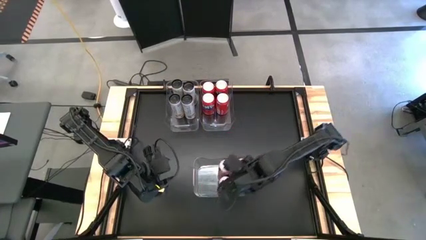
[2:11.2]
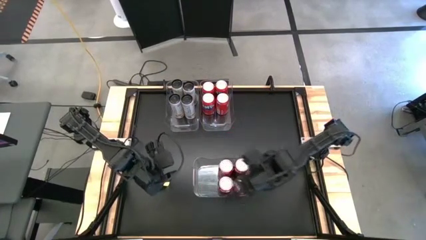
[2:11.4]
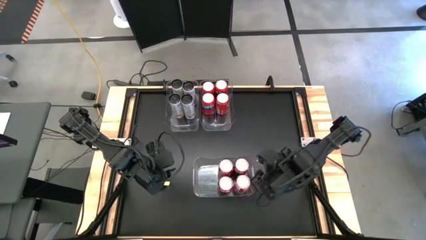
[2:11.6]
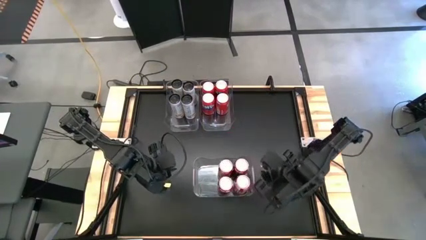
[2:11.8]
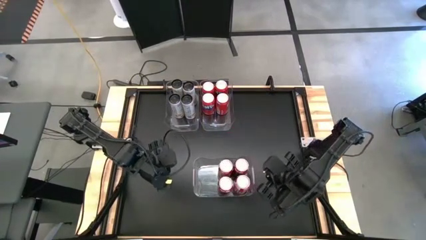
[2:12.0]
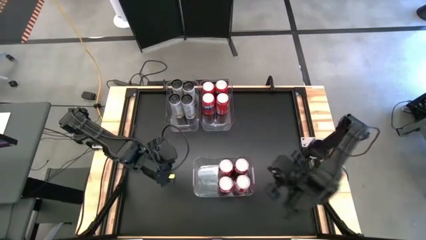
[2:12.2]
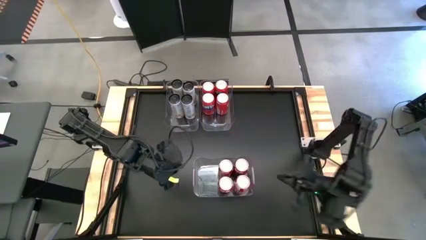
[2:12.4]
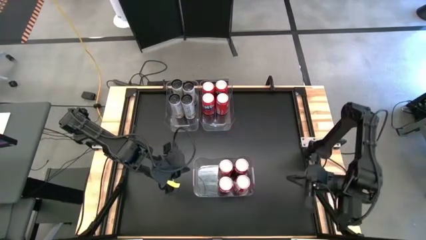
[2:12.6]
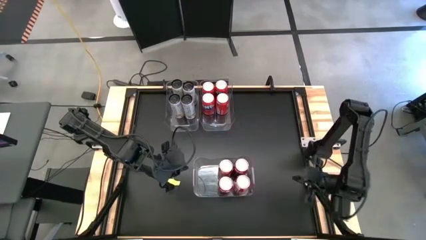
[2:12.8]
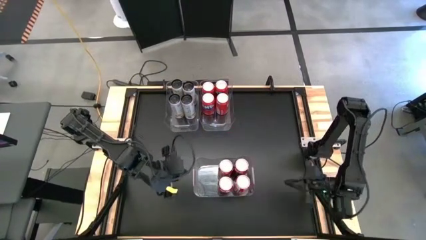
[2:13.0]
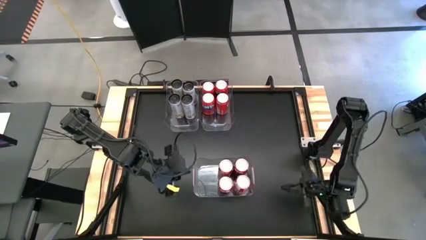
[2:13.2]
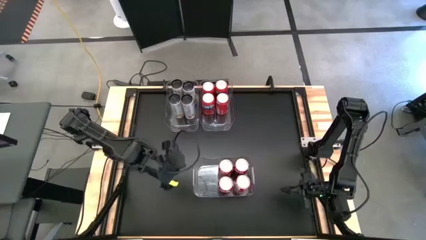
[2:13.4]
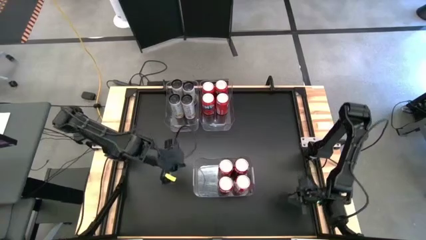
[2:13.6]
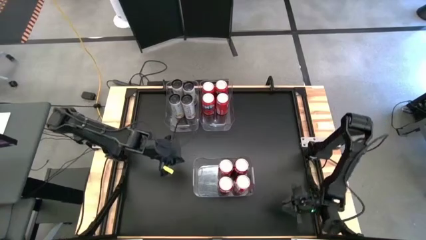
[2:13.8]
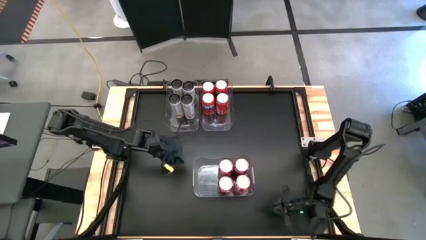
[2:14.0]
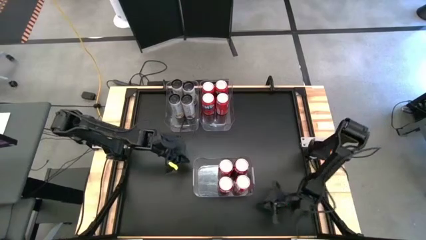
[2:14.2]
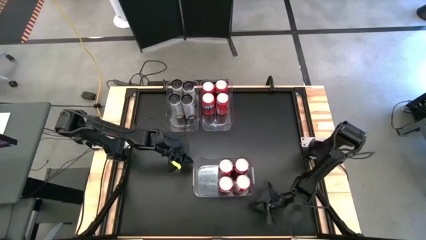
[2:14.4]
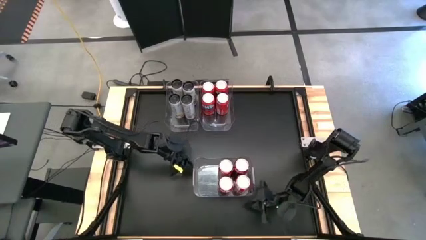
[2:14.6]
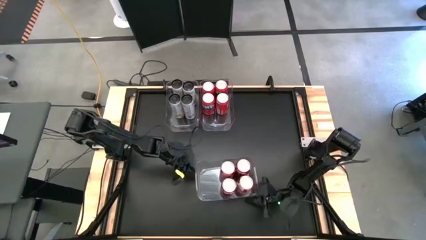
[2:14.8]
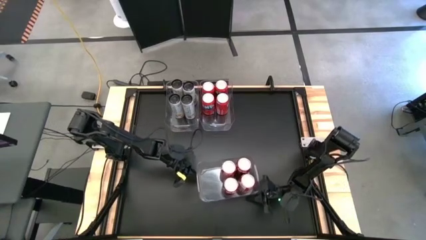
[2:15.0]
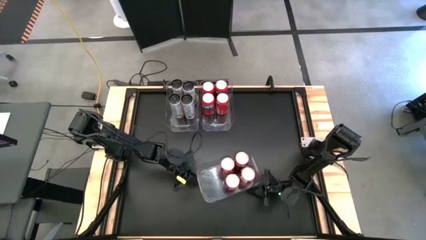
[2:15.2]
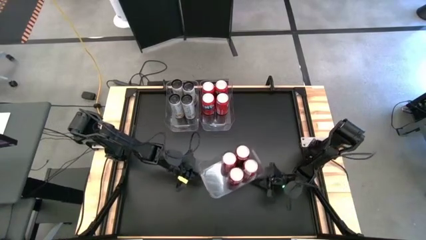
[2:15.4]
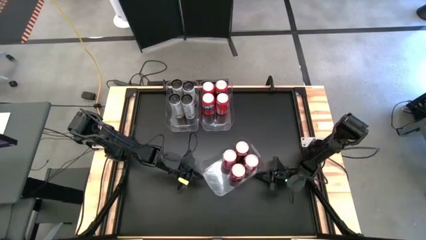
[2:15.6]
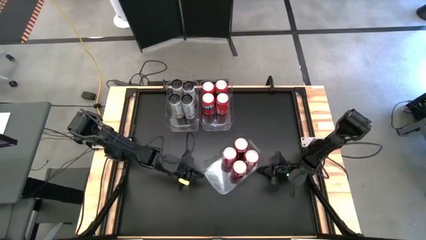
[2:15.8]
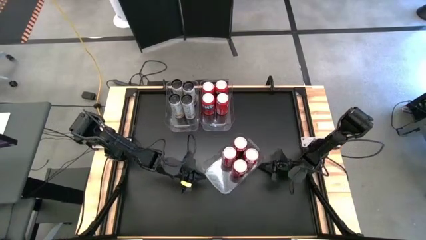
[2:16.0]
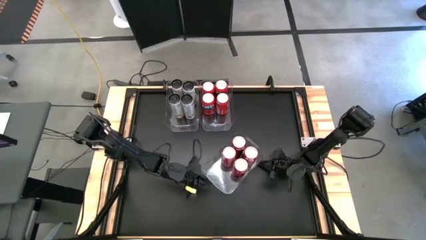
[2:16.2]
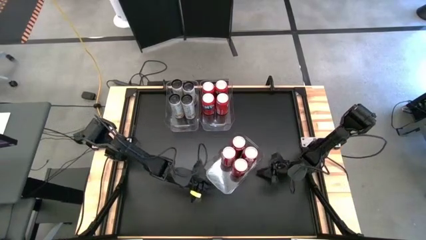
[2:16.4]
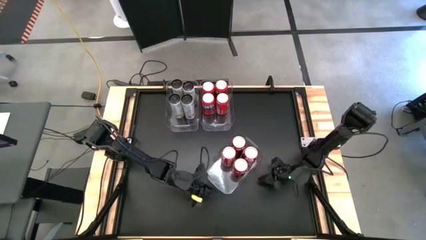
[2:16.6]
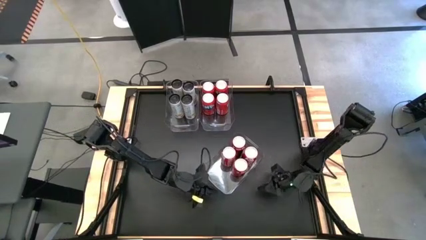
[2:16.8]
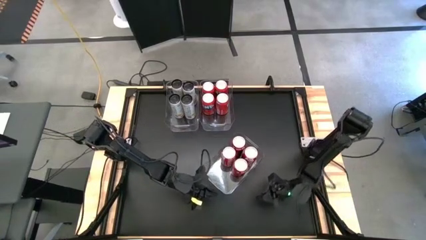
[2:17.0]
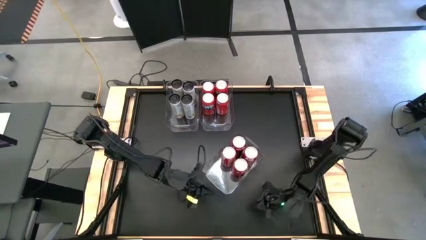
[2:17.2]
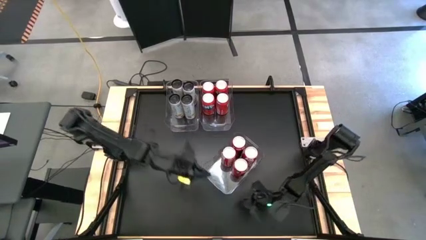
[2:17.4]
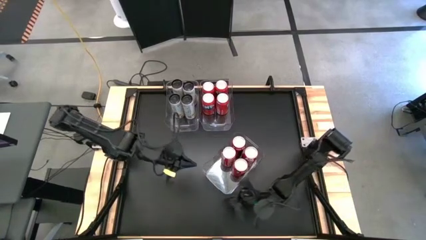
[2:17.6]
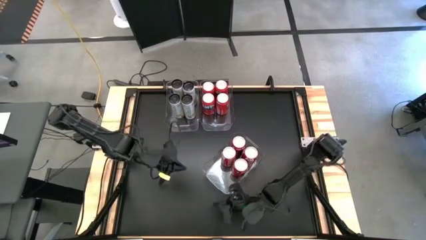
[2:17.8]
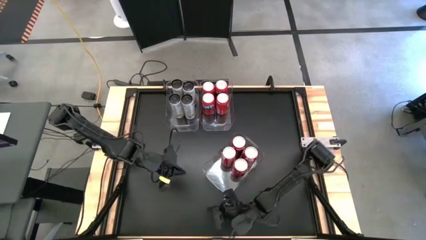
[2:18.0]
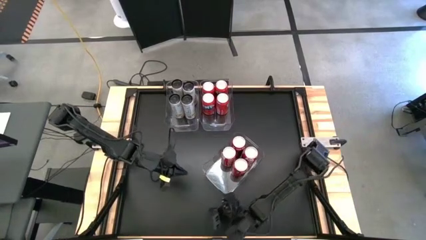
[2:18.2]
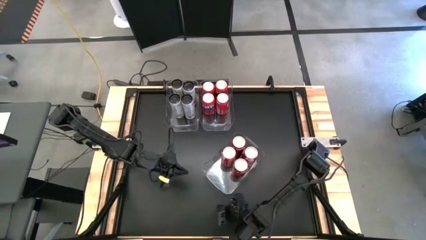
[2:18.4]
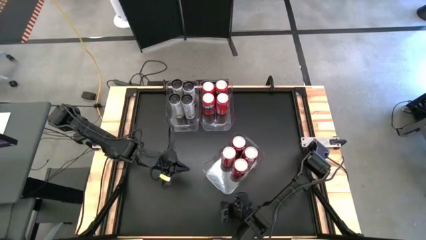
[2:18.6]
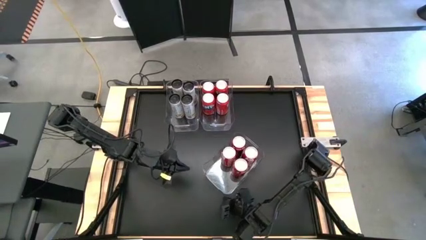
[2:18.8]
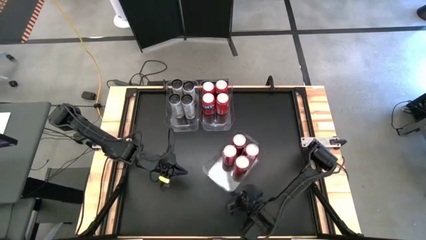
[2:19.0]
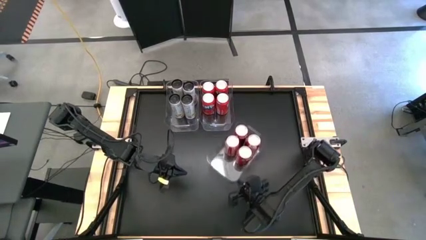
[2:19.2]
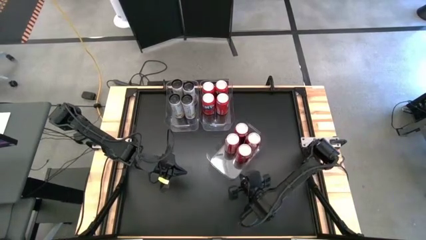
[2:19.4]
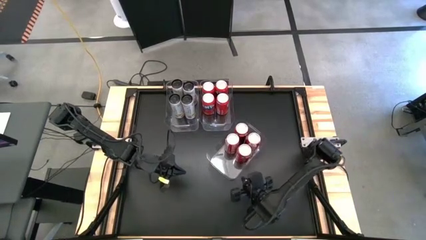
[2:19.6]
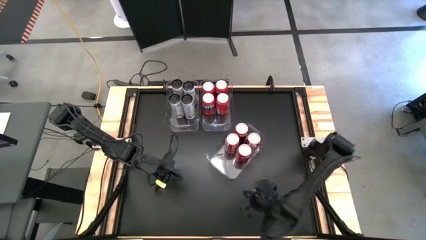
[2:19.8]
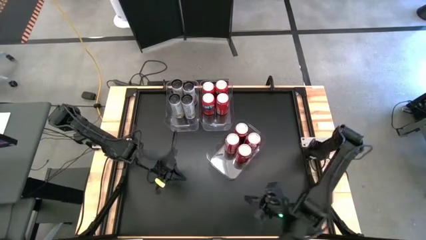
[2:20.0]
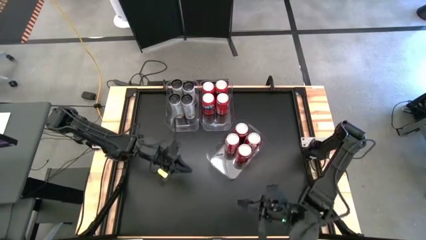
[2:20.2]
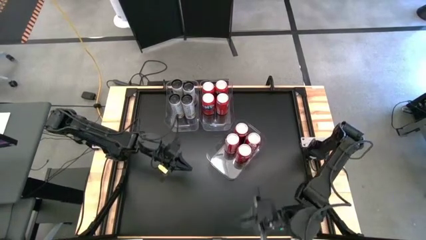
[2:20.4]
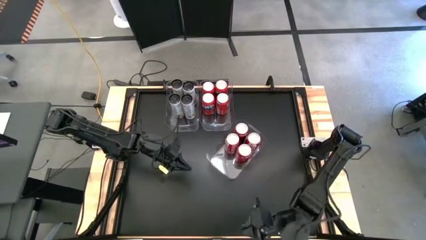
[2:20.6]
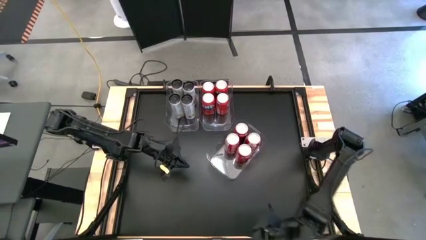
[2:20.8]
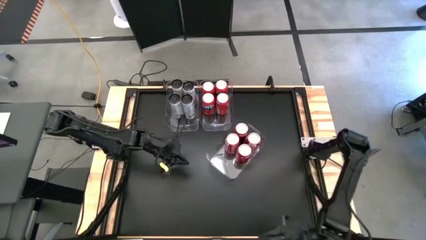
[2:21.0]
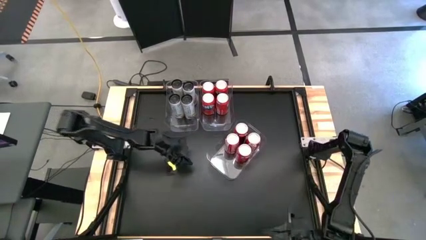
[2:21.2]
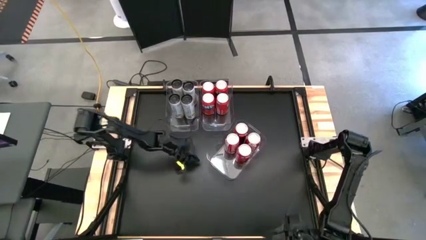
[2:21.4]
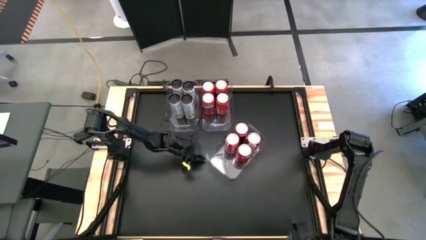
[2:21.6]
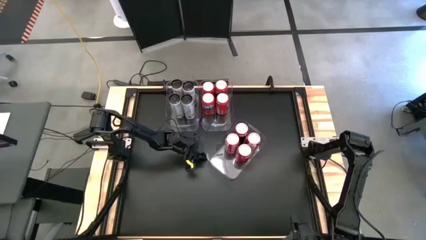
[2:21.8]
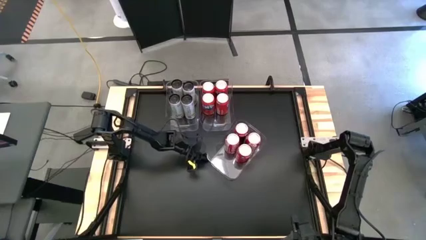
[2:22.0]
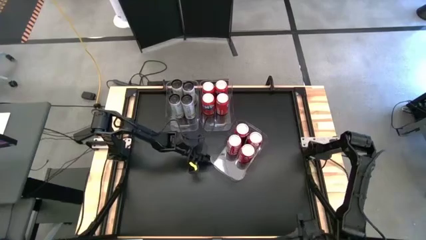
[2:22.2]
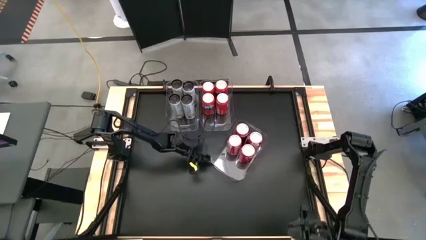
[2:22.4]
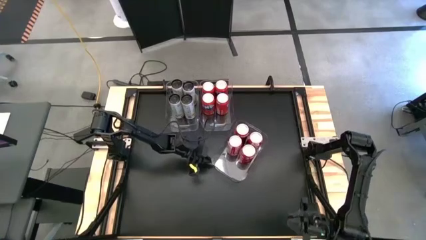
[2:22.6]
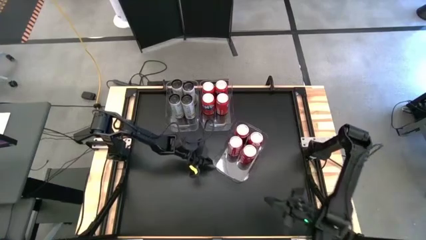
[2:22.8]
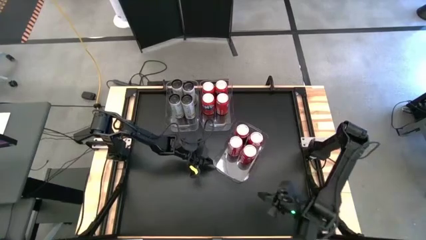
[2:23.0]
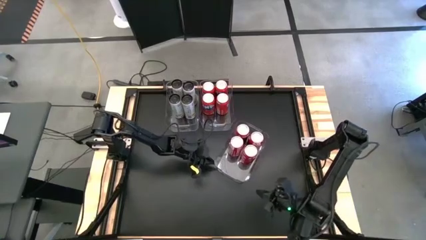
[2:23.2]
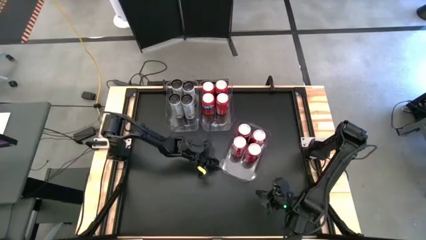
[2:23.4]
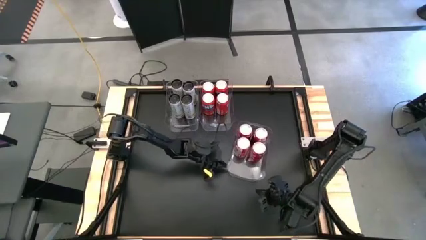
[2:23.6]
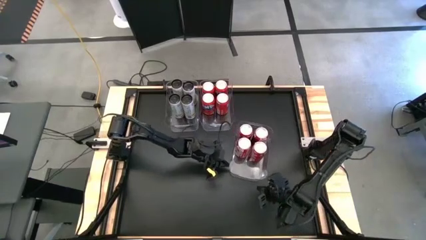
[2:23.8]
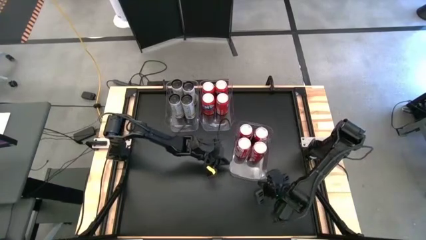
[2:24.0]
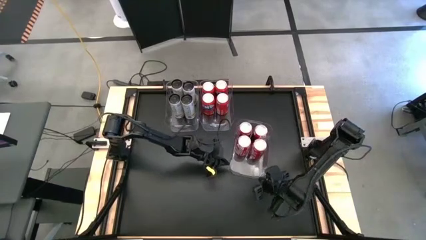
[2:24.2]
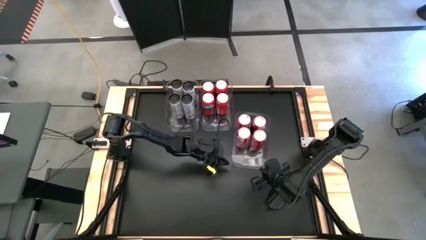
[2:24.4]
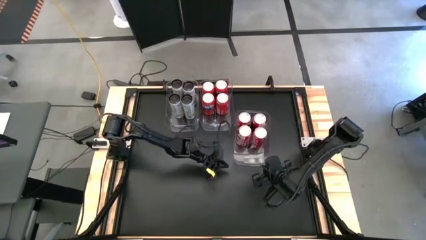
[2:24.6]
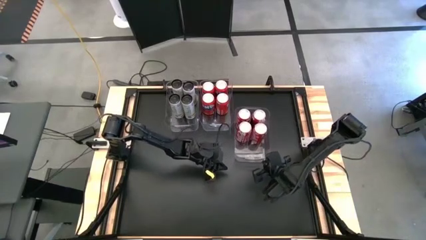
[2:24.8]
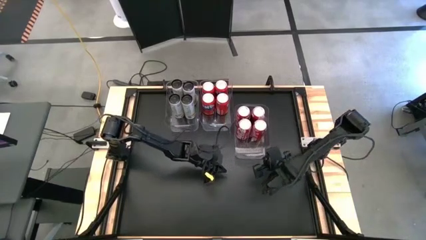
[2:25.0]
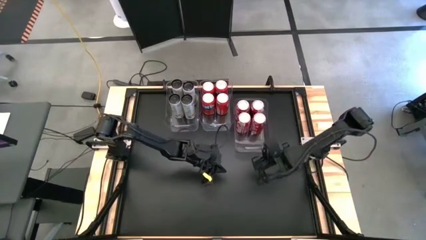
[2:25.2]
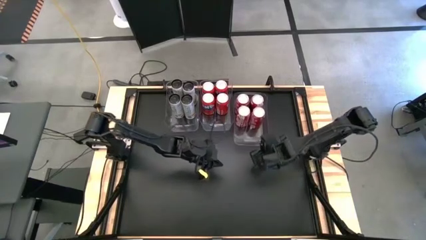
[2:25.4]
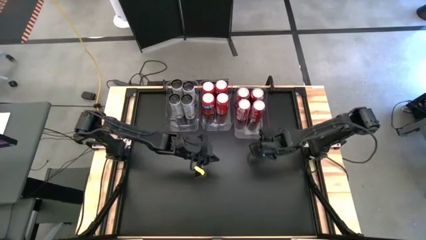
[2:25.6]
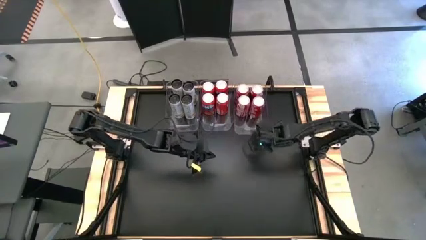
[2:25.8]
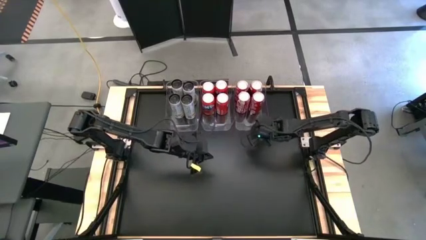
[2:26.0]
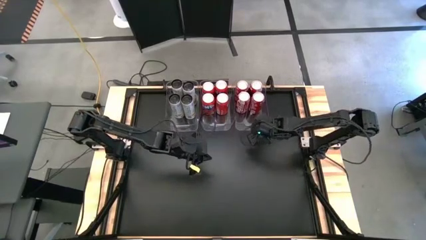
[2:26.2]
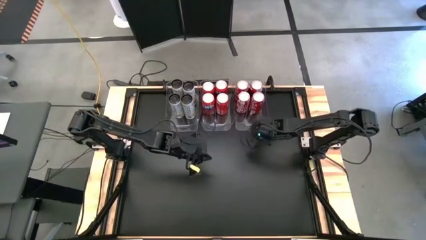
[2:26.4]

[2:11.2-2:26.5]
Task: Sort soda cans
Move the bottom transparent bin to the right side of the top left transparent bin
